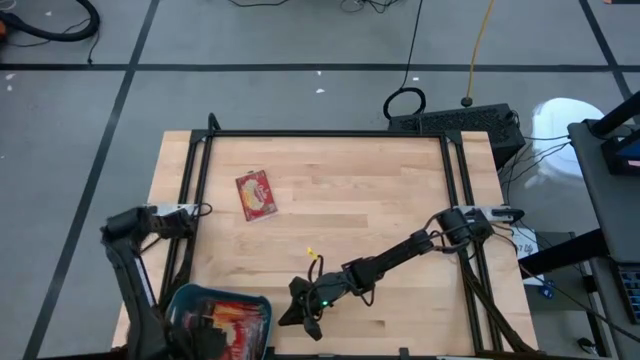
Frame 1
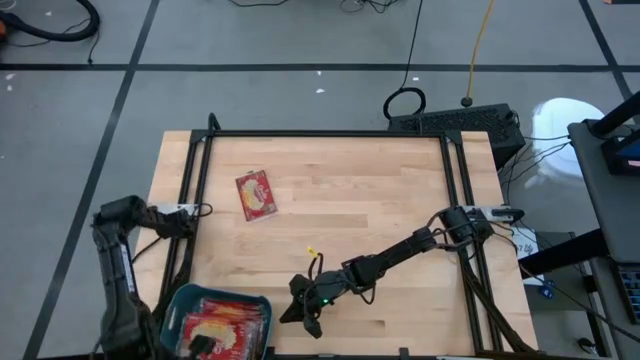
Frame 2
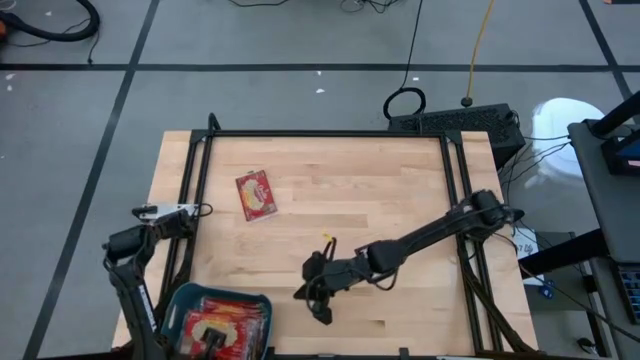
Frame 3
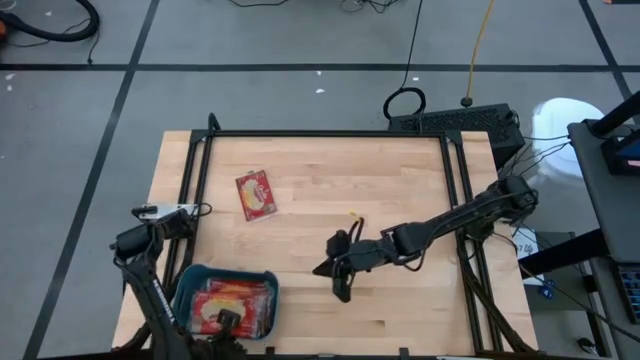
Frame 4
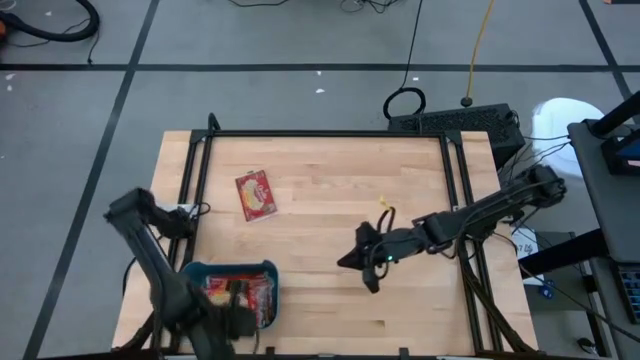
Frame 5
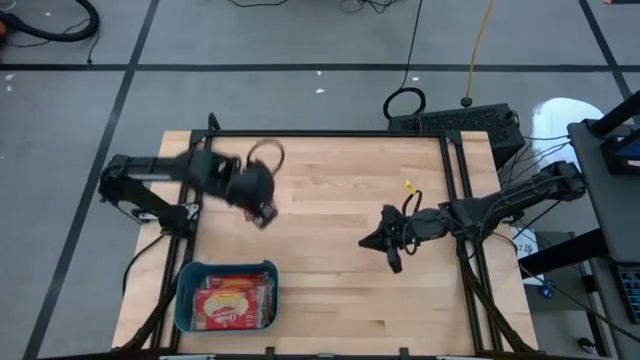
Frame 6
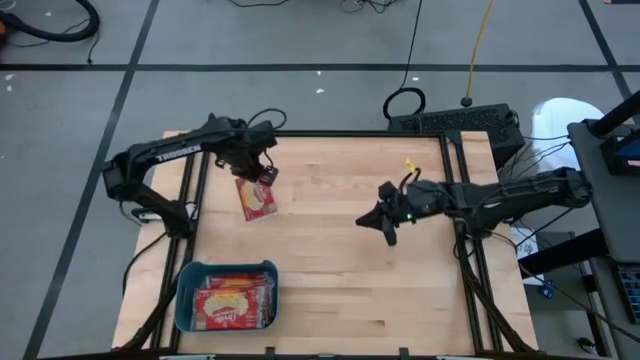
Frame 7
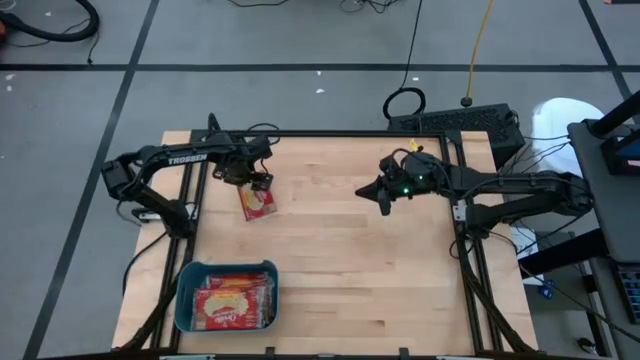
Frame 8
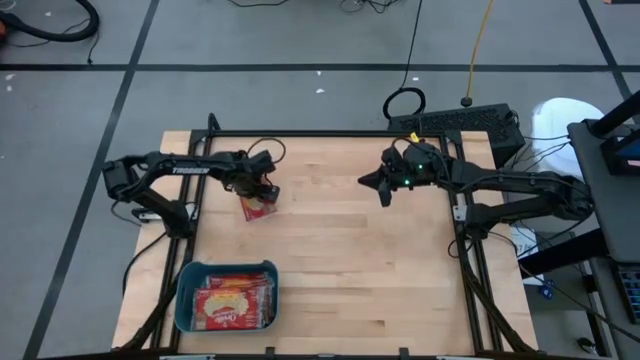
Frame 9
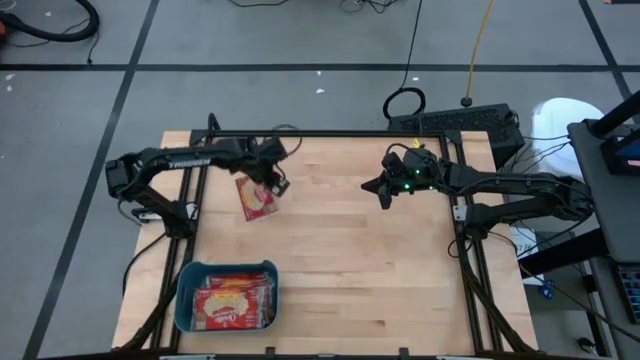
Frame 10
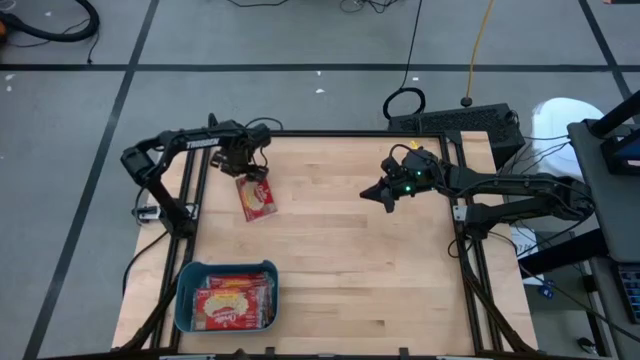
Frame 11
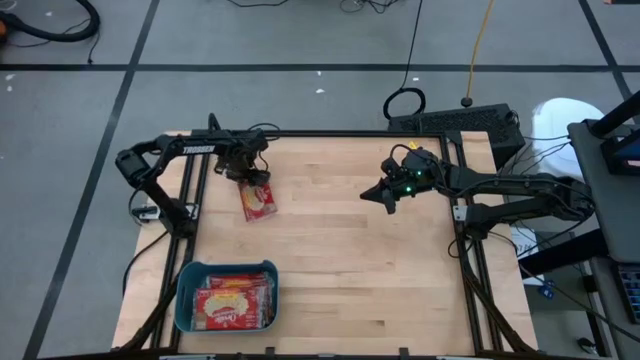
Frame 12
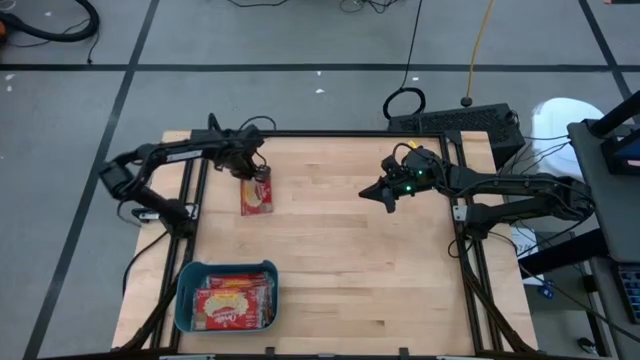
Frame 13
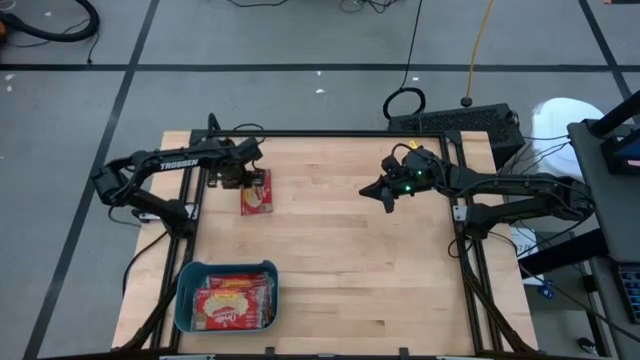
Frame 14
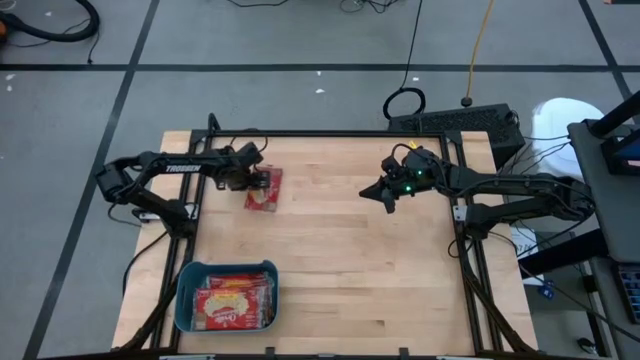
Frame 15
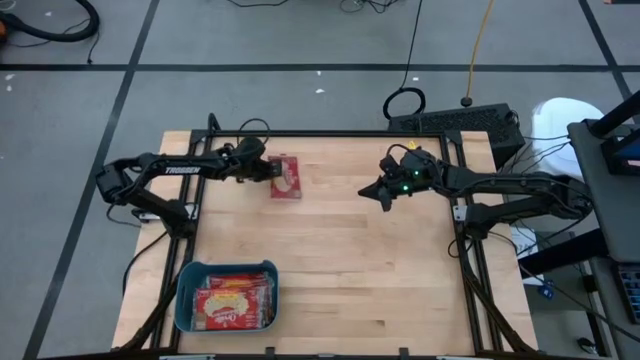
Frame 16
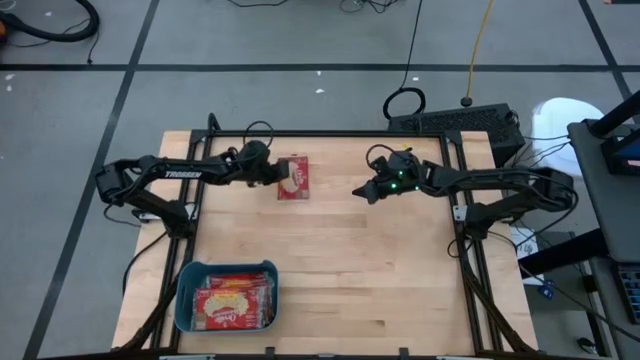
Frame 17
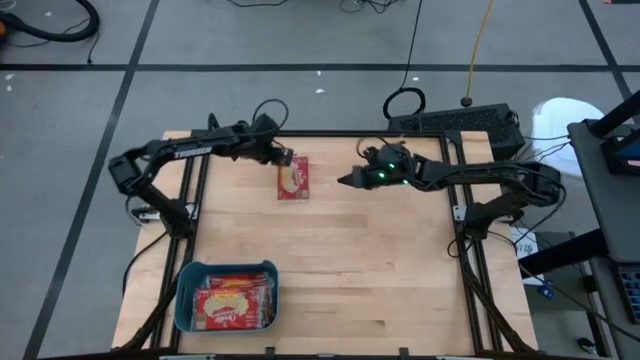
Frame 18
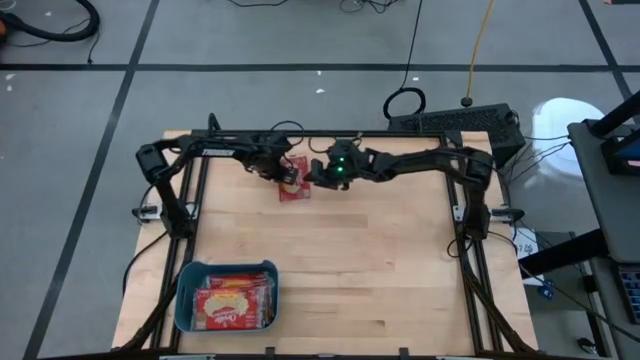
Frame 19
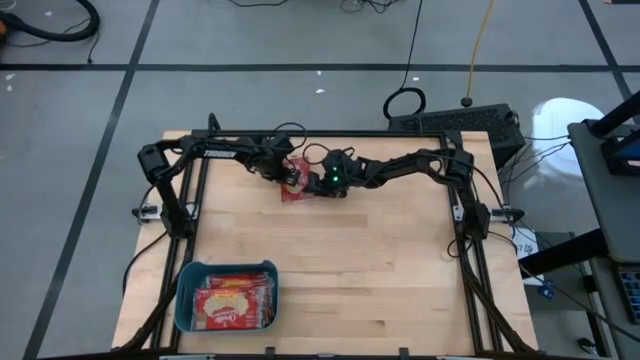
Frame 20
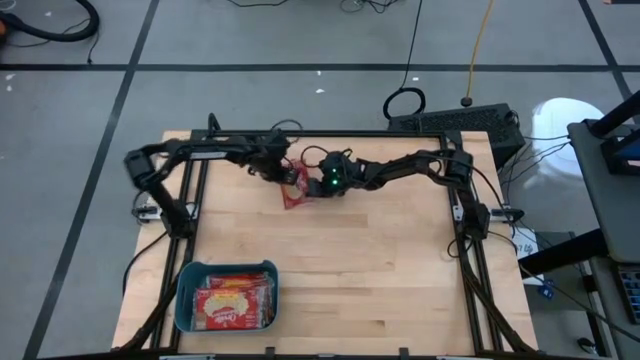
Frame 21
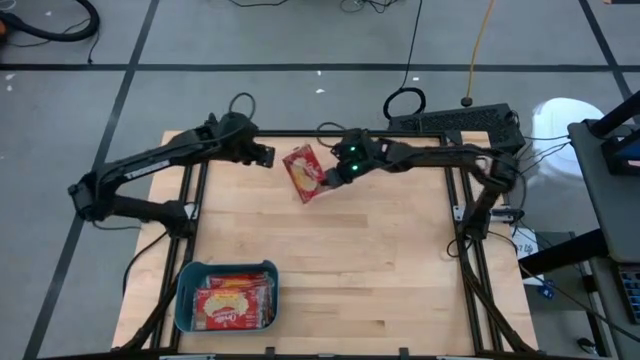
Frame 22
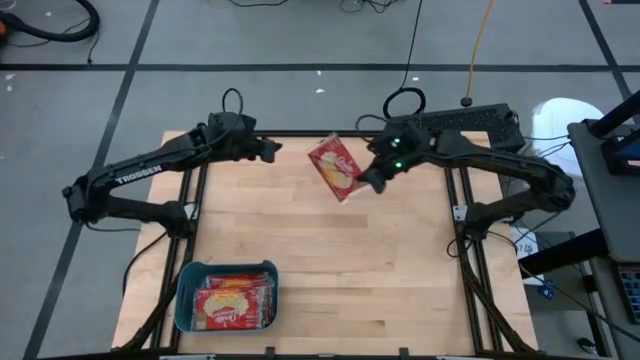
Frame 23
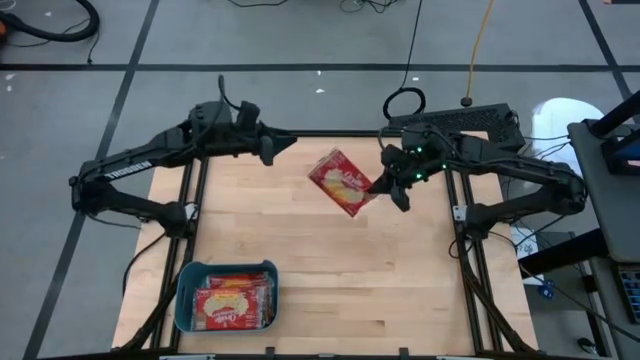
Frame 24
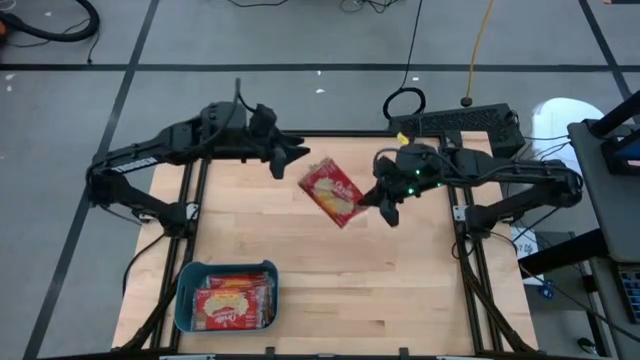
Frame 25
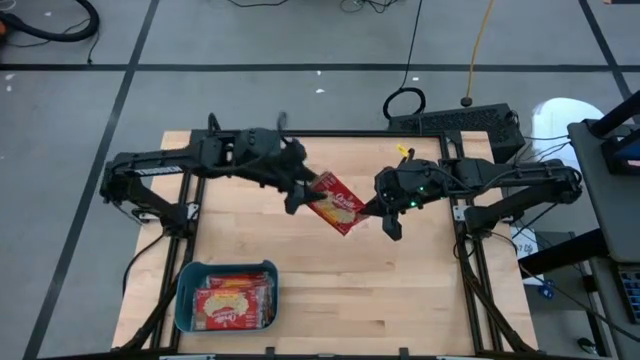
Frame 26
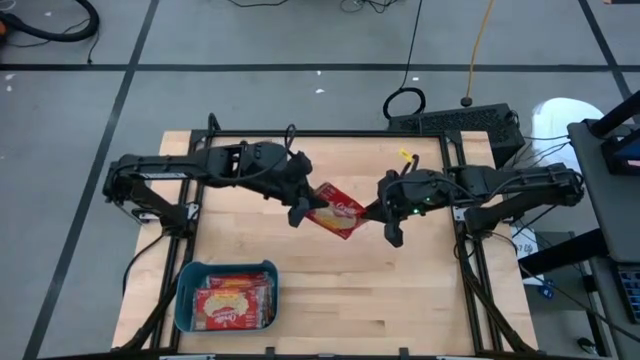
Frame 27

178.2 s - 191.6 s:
Task: Sort popcorn bags into baskets
Put the popcorn sachet into the bin
